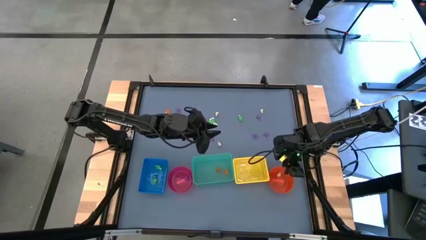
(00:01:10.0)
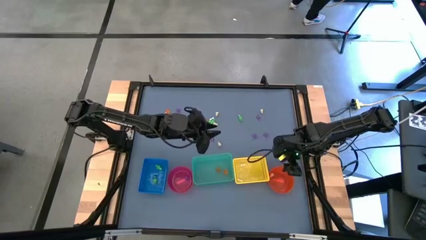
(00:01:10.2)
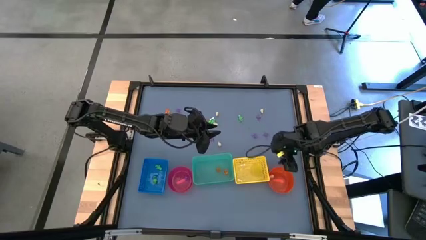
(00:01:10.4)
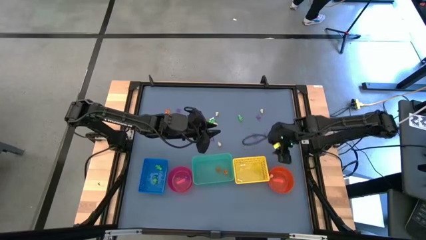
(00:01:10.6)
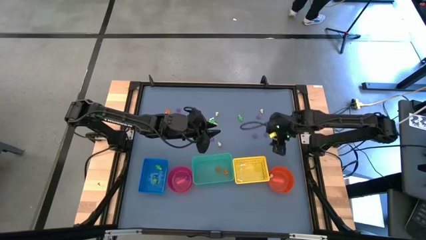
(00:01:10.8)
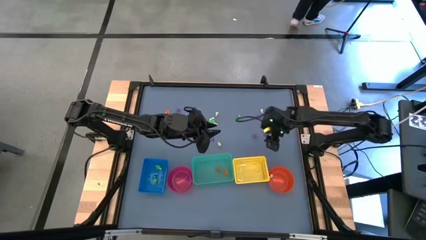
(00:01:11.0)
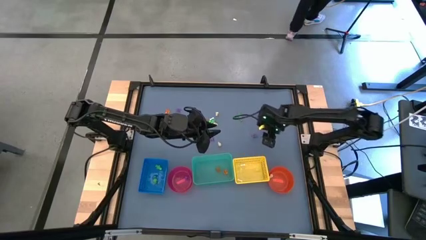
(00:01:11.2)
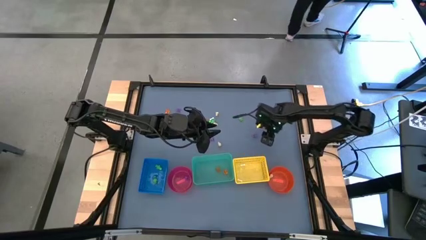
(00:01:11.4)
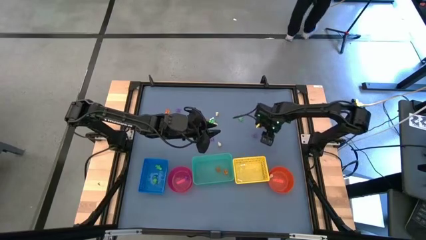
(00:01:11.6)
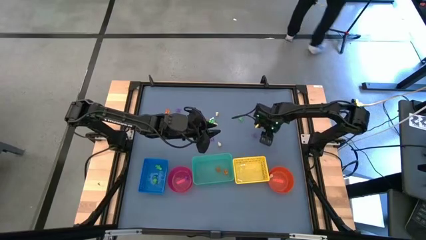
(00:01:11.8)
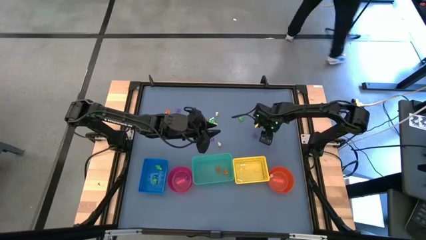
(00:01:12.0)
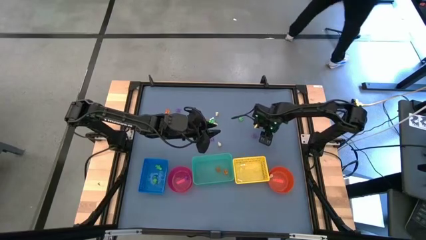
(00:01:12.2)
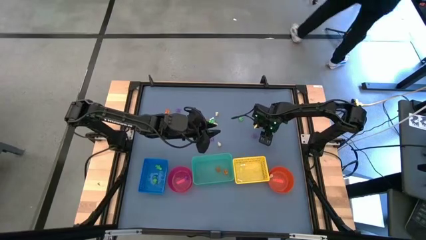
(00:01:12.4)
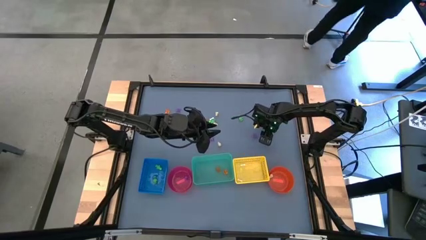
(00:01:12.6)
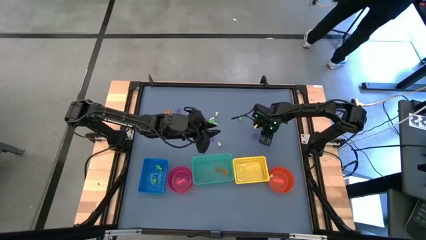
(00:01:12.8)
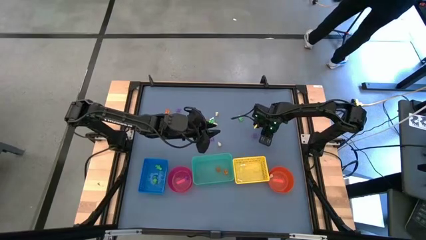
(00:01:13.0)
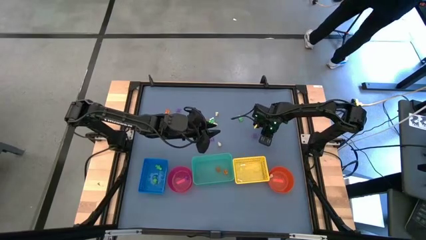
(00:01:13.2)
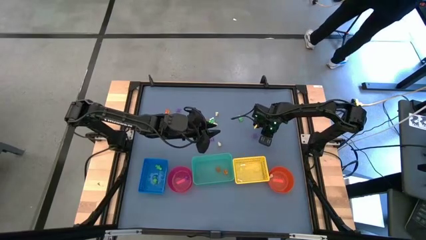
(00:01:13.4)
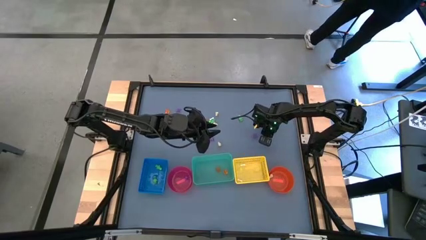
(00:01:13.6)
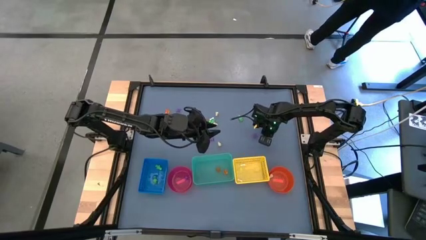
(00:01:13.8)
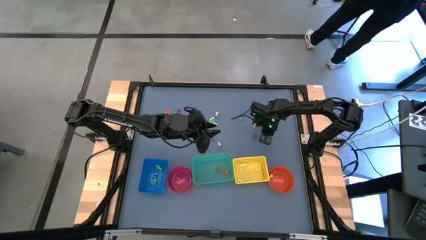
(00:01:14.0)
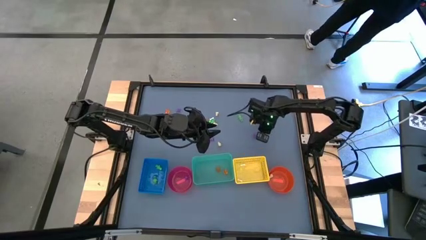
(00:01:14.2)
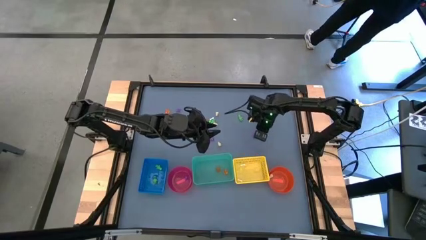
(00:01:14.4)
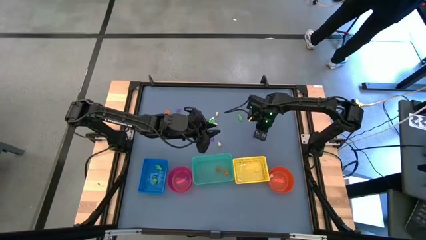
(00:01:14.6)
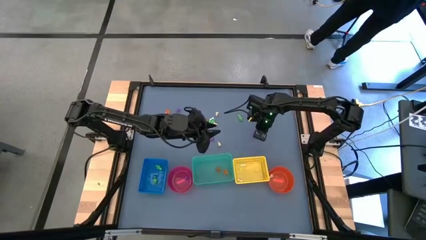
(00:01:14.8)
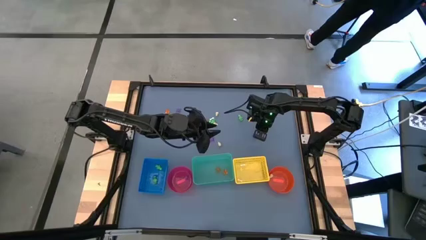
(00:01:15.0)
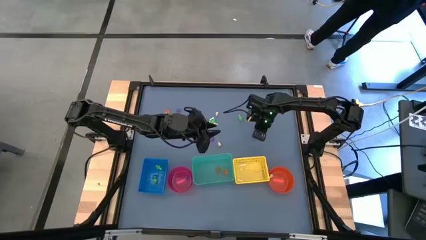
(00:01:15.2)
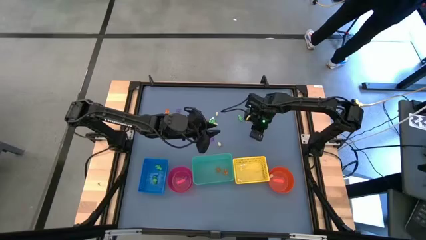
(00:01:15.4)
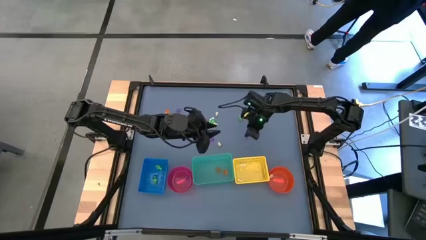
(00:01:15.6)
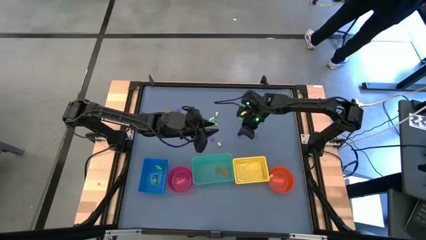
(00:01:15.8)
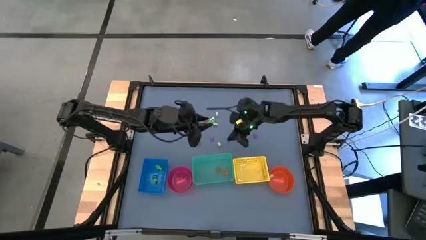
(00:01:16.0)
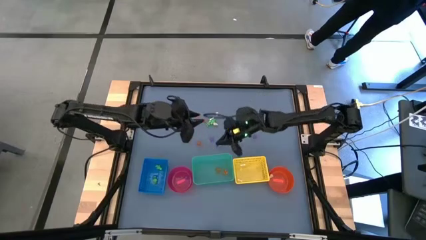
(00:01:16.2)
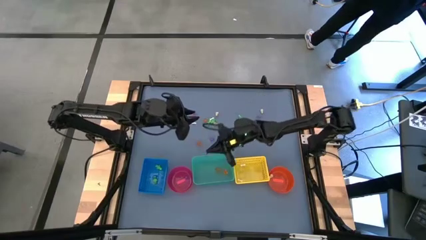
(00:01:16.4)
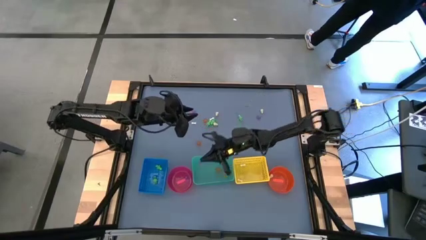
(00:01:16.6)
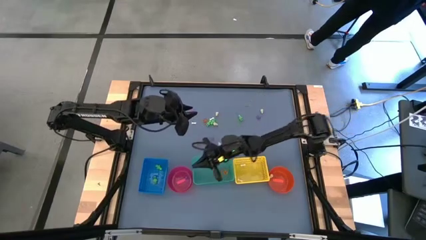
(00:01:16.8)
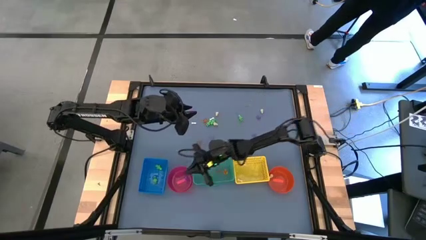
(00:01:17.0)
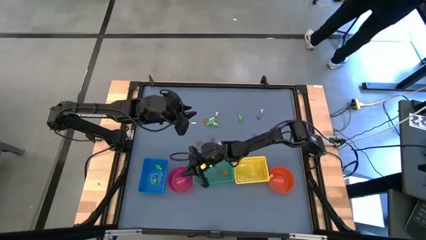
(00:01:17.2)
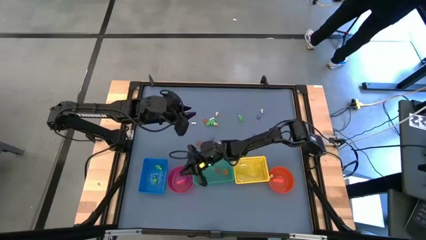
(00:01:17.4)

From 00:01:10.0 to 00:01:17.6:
Task: Sort Halloween decoration
Put the purple spider toy into the pink bin

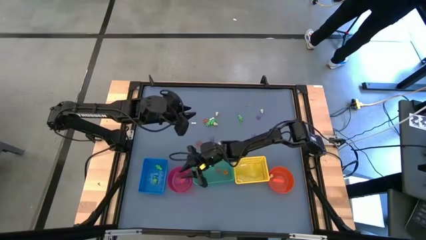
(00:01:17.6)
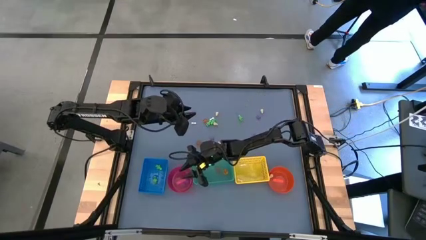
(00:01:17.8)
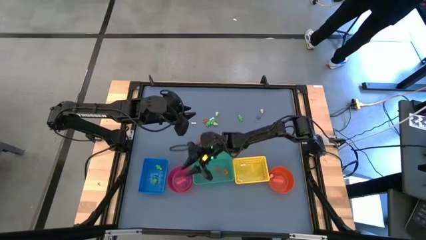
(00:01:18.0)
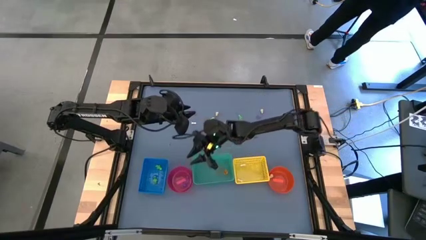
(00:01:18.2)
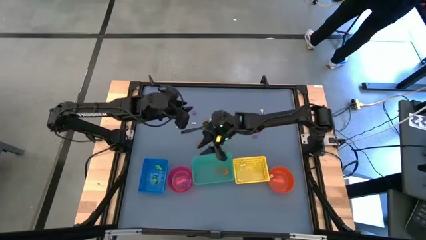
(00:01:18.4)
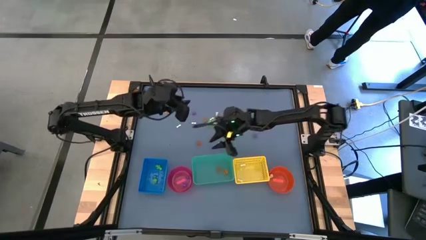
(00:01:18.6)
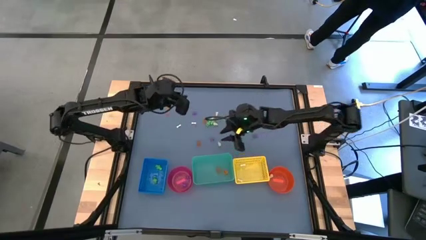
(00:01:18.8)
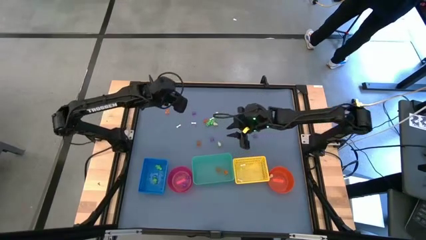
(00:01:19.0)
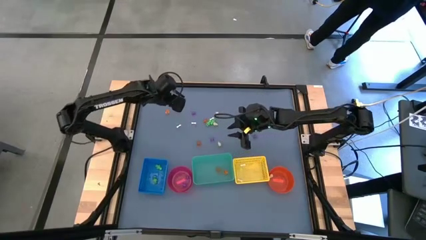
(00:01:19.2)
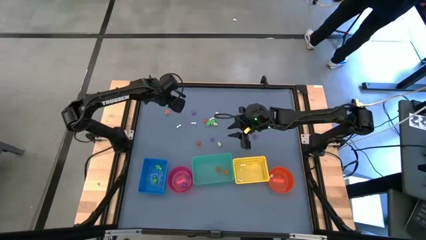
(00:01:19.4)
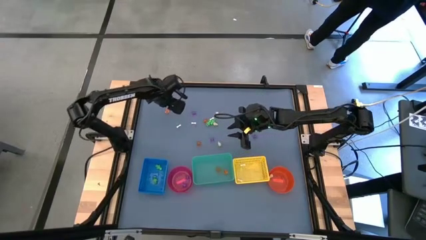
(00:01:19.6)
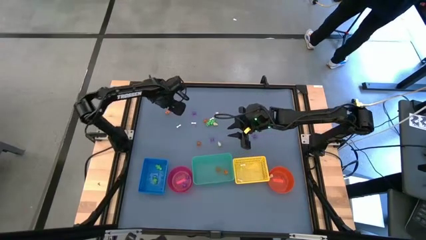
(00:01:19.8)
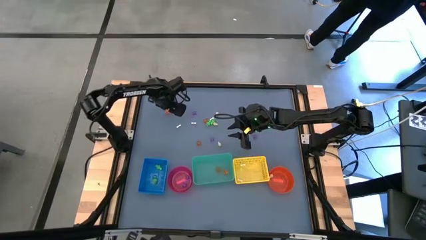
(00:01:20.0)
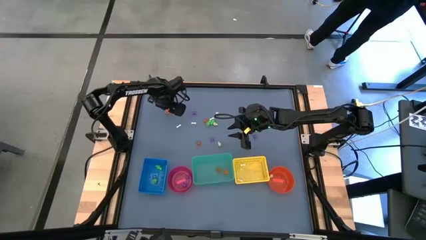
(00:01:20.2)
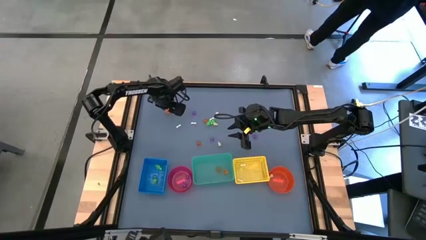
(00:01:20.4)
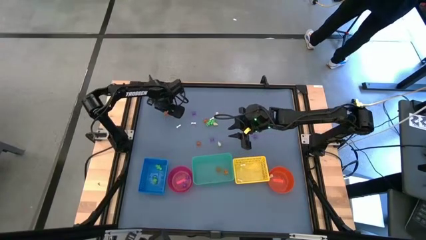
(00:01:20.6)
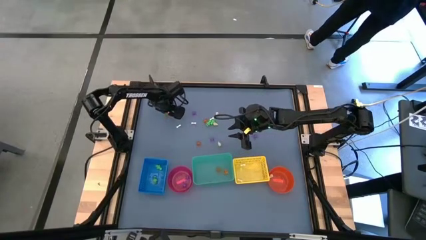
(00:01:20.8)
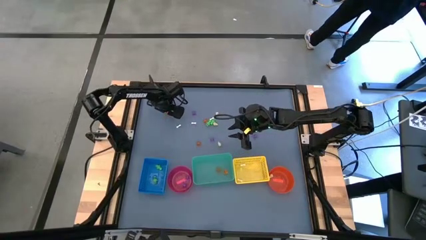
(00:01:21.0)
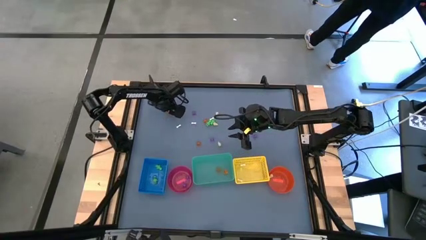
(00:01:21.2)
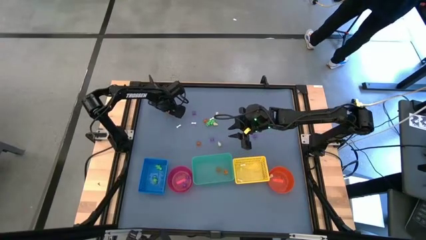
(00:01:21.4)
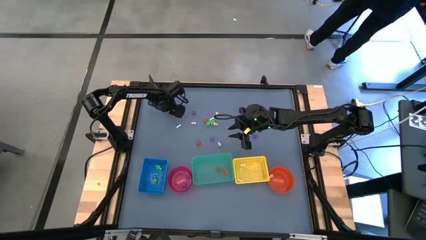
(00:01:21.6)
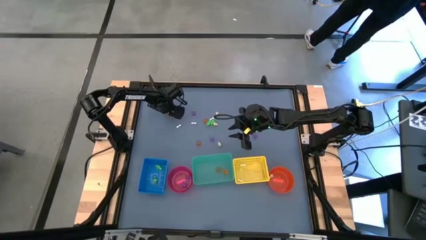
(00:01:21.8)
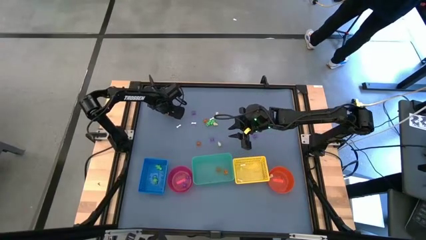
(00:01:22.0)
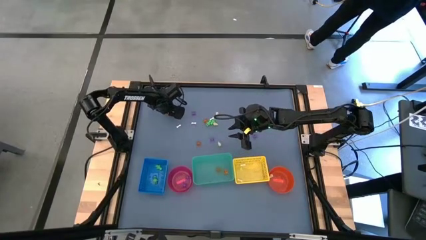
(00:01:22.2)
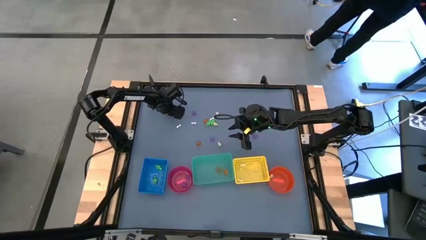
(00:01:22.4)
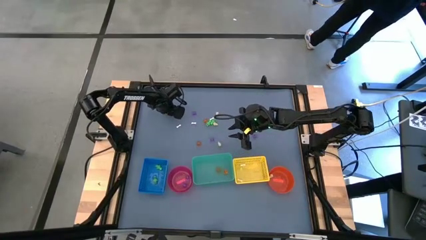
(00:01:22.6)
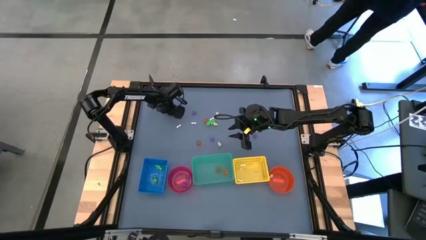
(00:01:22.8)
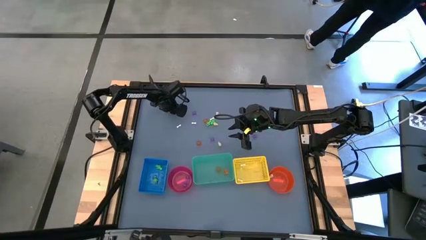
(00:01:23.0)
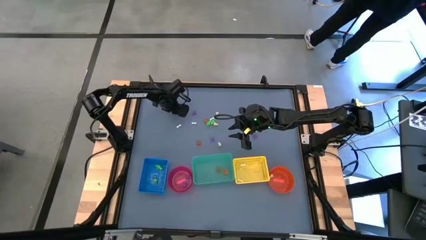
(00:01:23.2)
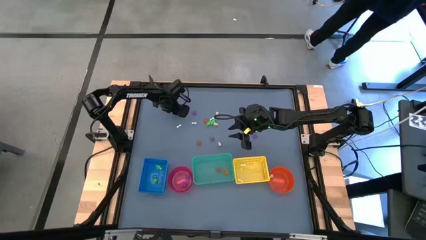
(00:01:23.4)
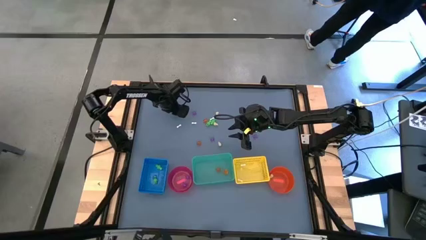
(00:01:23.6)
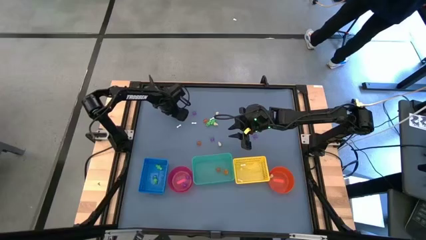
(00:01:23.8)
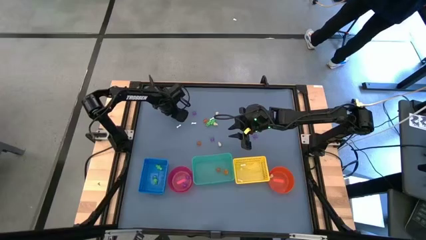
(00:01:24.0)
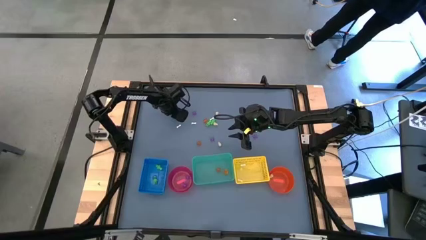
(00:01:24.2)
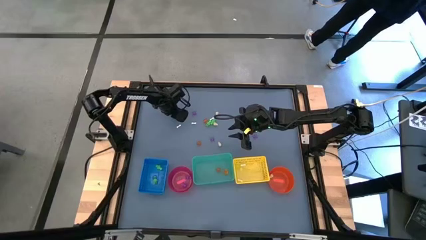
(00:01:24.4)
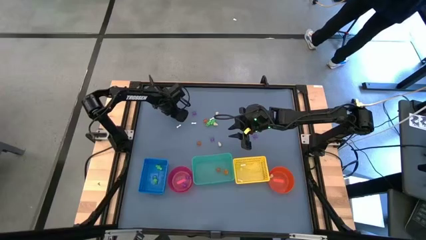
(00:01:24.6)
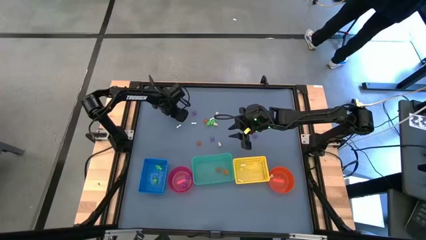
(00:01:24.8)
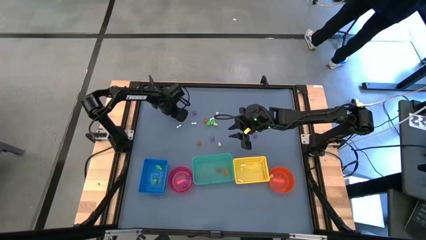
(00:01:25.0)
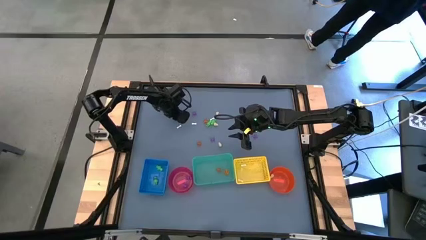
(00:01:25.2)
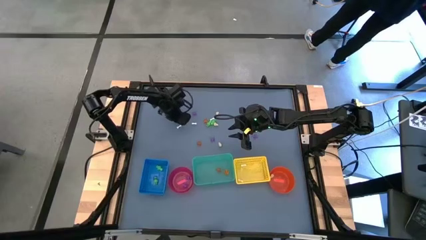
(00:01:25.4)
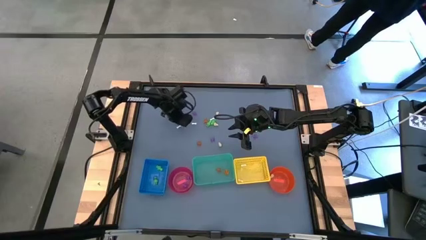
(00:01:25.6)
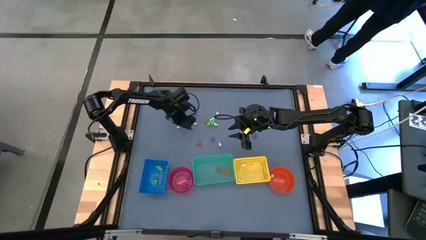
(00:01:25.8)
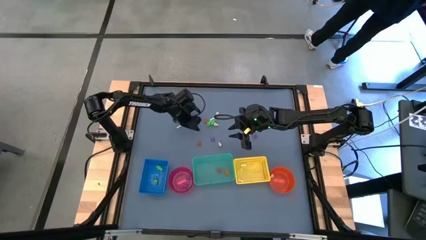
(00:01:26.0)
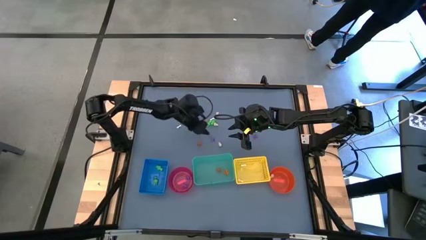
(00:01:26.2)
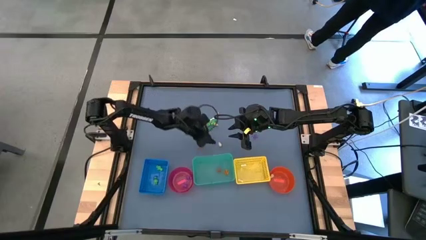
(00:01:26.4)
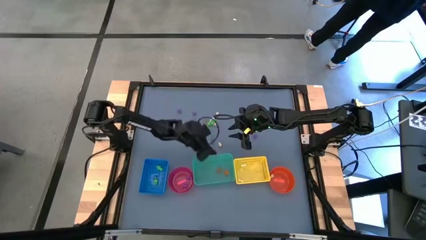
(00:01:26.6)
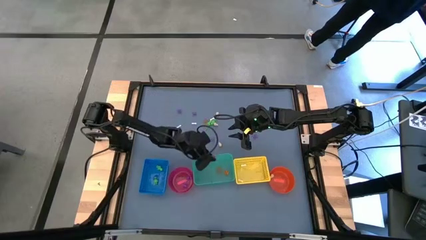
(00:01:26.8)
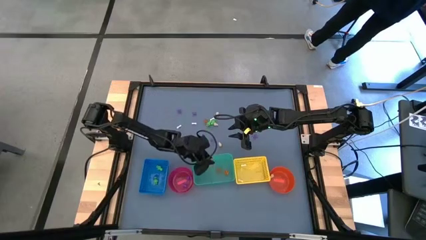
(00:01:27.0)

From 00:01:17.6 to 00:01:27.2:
Put the orange pumpkin toy into the green bin
